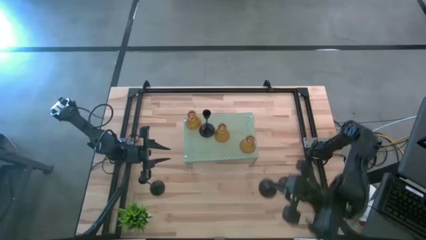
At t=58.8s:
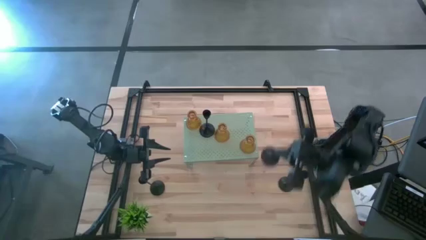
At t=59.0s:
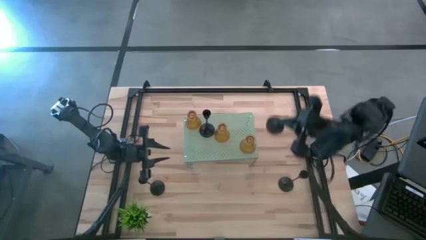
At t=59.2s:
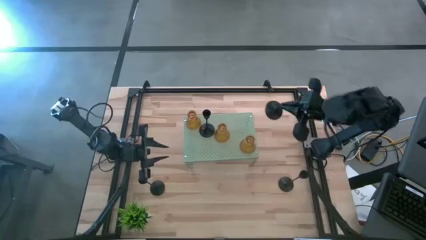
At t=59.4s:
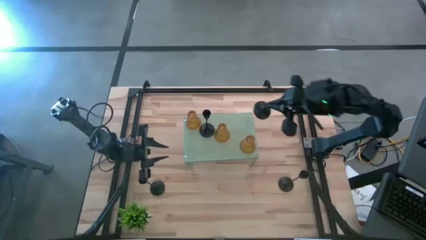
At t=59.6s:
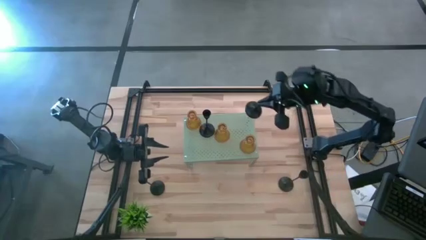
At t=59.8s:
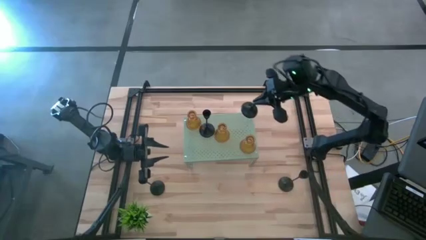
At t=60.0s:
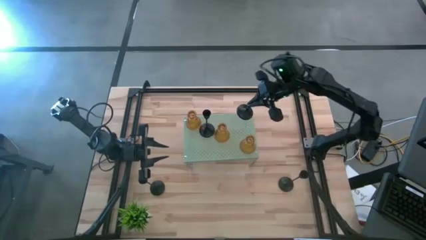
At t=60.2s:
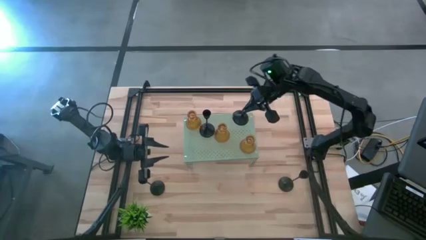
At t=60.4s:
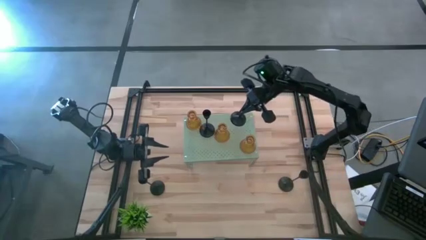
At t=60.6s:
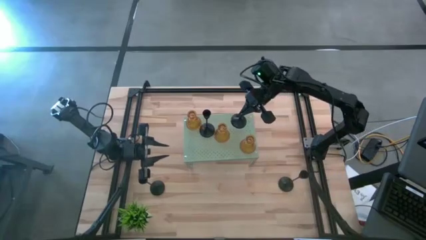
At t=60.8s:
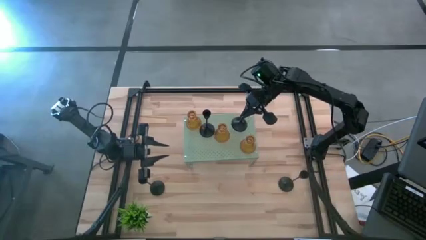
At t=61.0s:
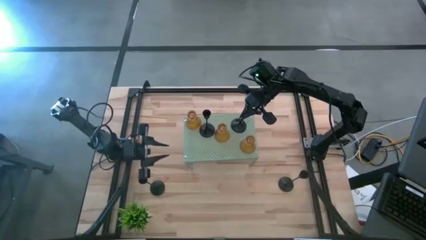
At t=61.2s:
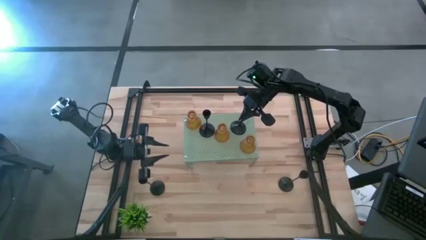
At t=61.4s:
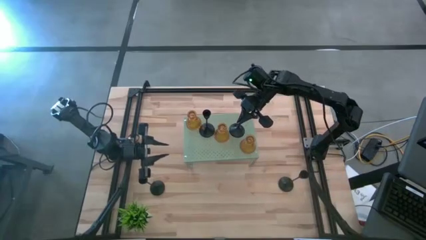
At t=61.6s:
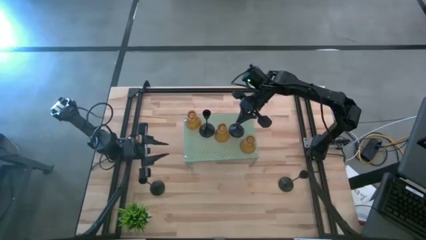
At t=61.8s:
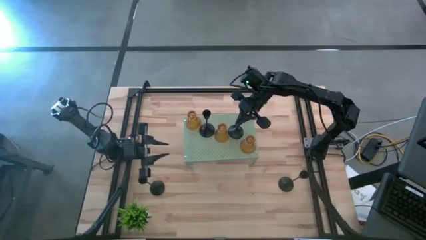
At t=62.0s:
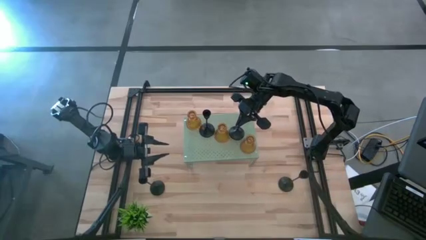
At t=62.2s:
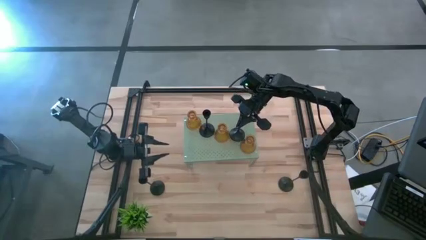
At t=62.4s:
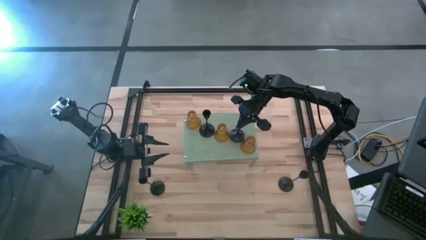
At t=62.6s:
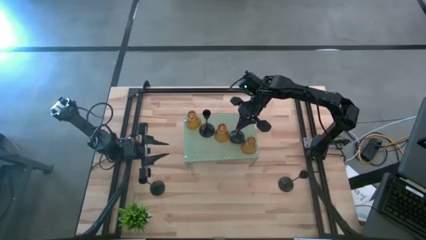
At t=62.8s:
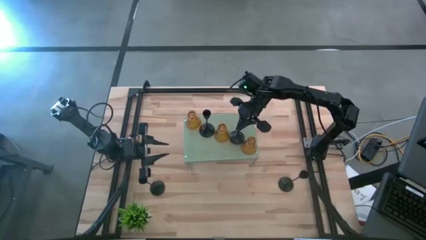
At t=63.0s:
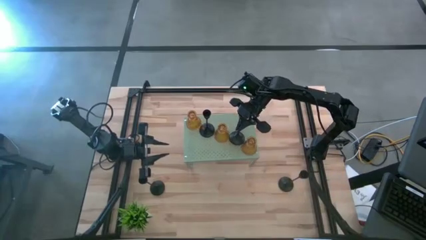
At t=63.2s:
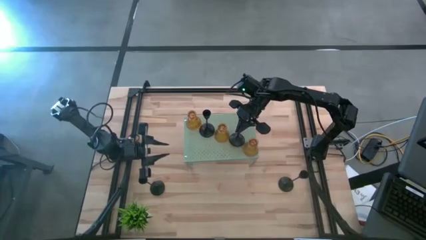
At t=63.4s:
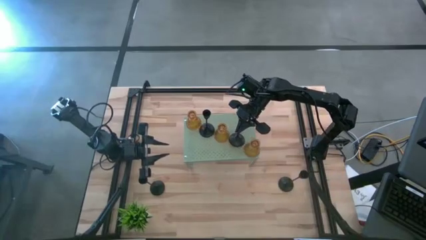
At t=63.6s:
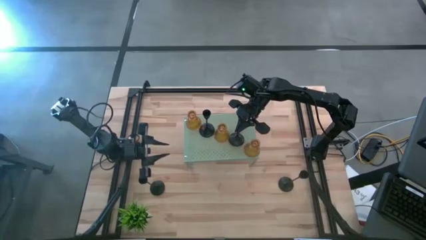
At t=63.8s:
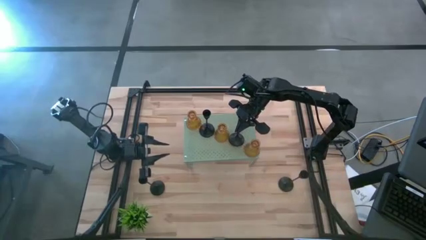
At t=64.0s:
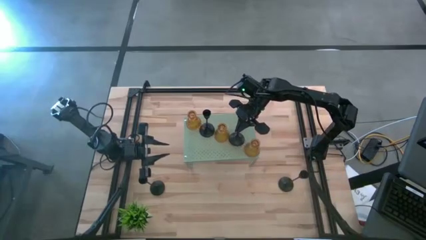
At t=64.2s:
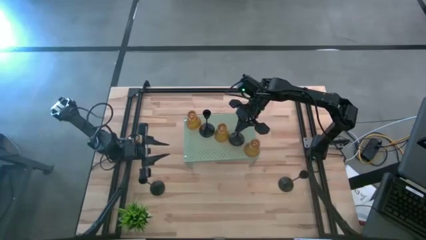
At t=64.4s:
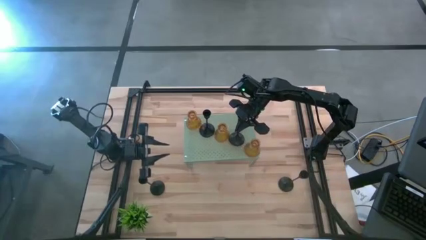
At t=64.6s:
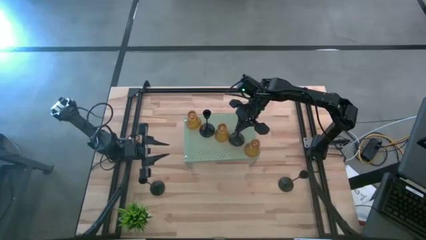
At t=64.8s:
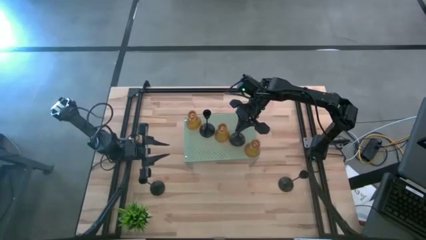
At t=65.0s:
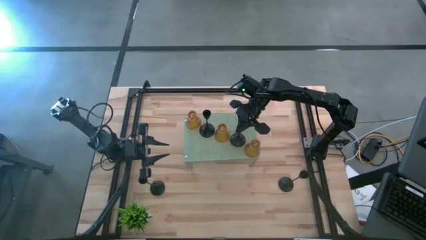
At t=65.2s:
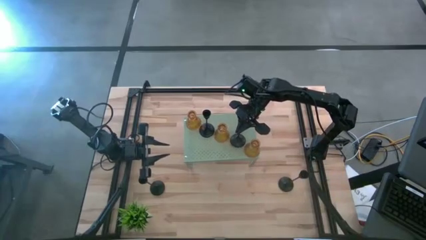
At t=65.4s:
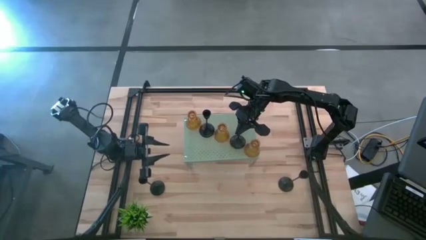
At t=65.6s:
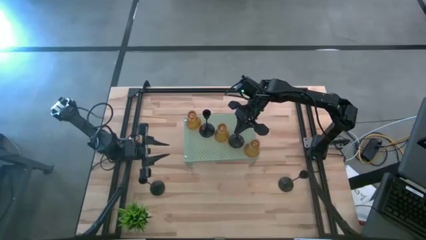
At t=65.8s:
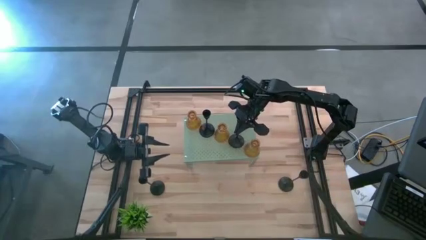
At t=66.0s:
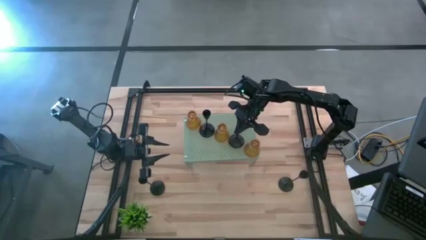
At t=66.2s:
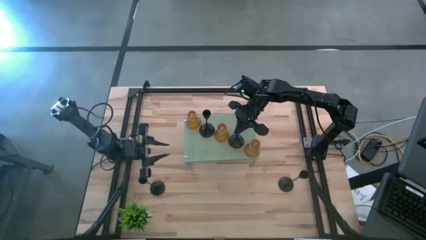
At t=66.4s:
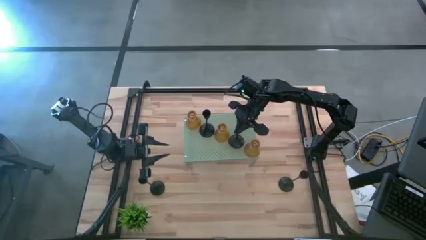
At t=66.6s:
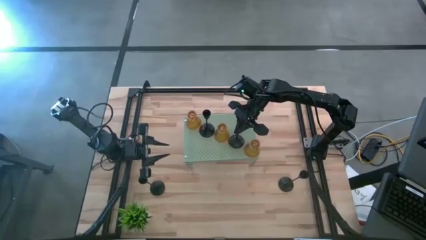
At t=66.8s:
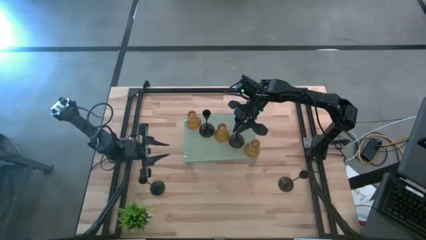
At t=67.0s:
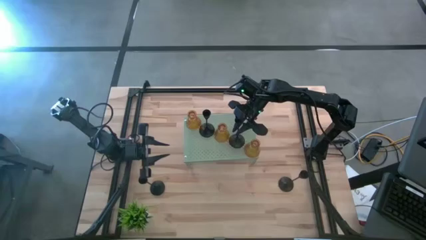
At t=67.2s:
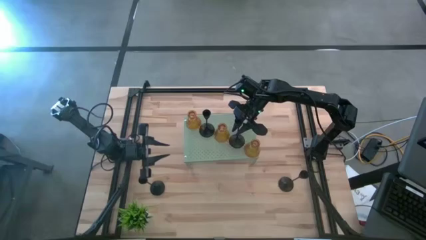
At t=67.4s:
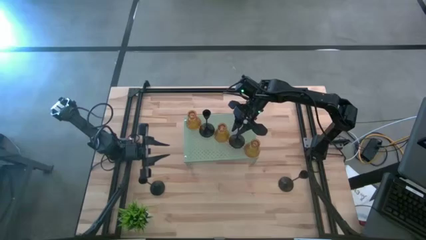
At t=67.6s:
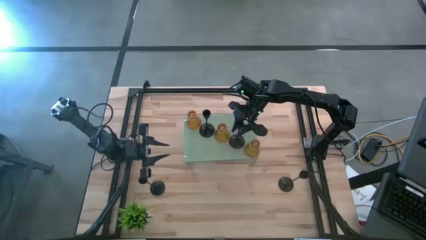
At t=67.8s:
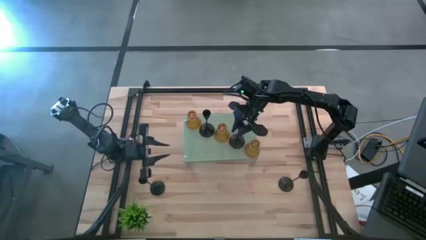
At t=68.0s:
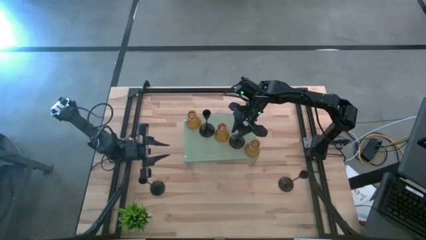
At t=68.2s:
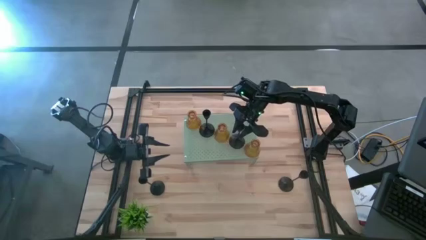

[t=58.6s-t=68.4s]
Task: Pick & Place candle stick holders
Put the black candle holder on the shelf

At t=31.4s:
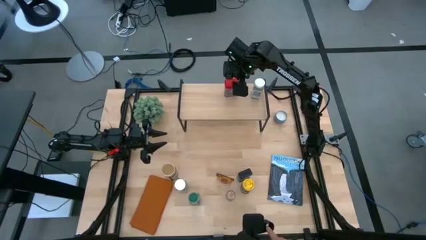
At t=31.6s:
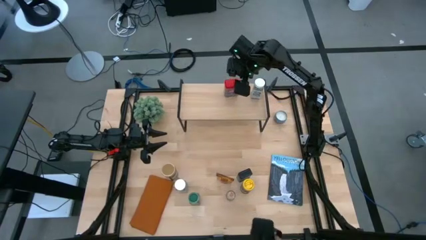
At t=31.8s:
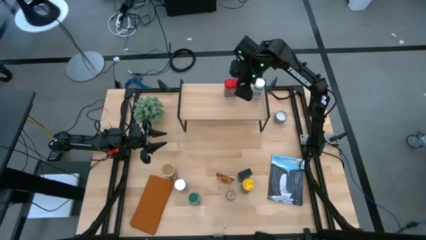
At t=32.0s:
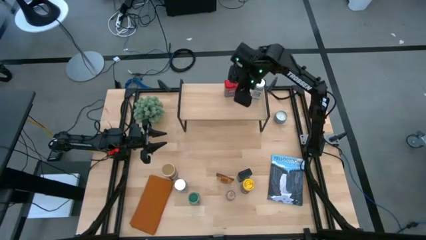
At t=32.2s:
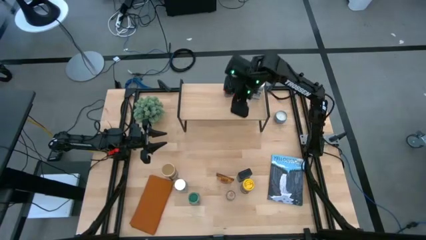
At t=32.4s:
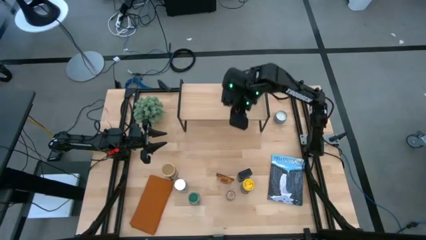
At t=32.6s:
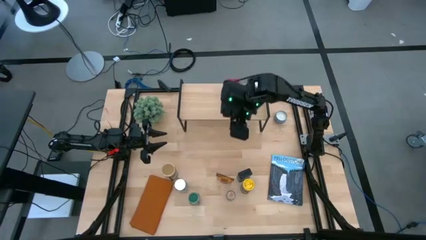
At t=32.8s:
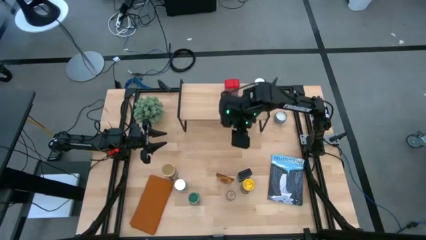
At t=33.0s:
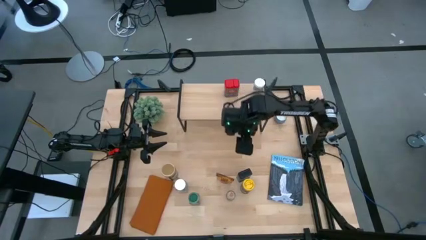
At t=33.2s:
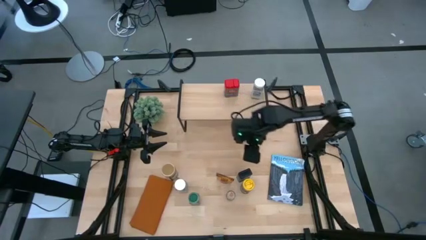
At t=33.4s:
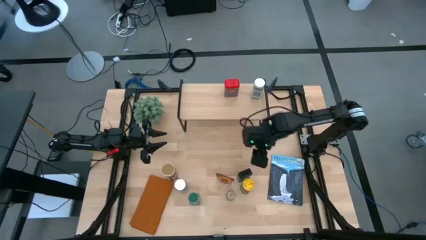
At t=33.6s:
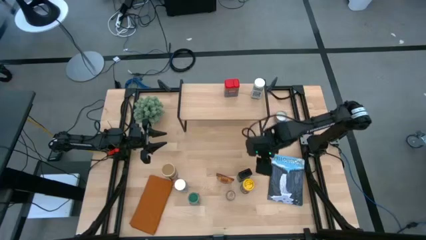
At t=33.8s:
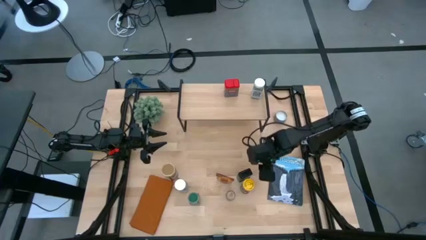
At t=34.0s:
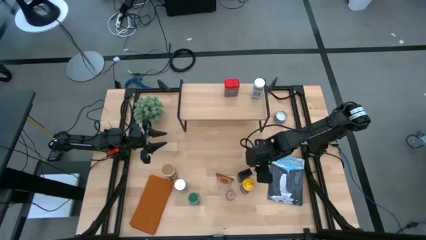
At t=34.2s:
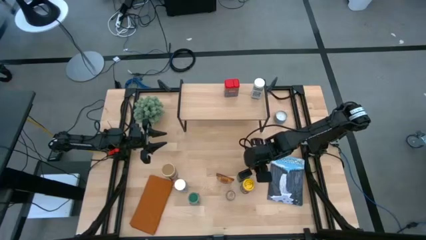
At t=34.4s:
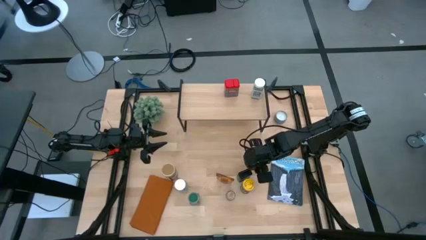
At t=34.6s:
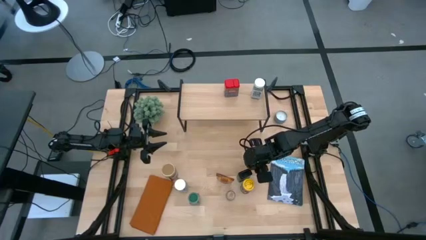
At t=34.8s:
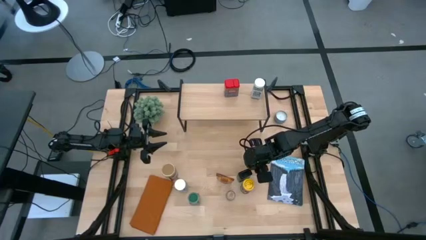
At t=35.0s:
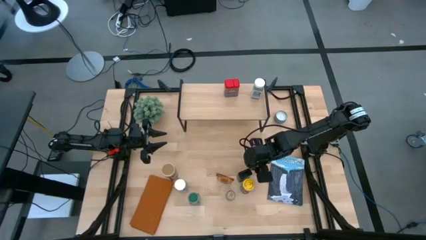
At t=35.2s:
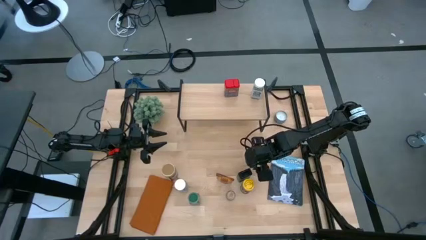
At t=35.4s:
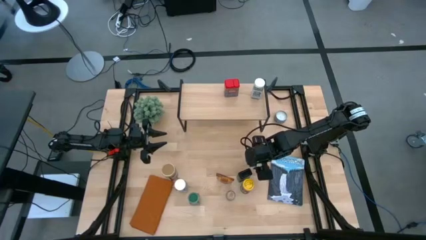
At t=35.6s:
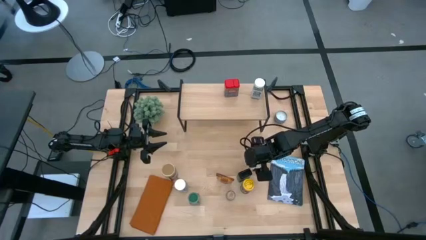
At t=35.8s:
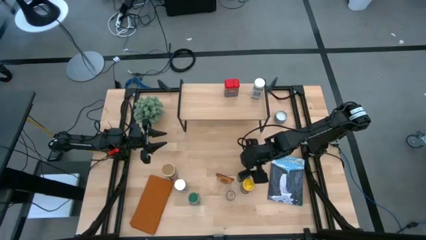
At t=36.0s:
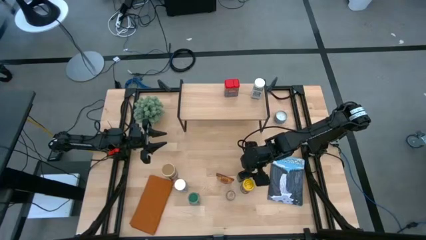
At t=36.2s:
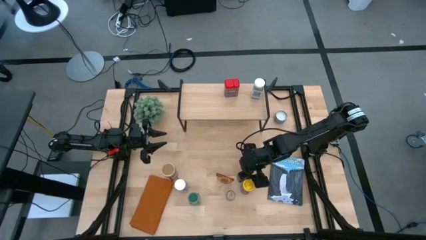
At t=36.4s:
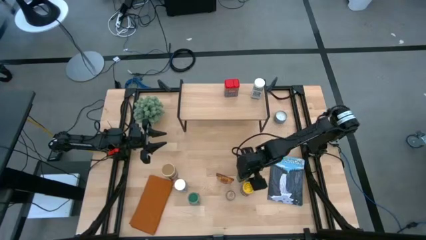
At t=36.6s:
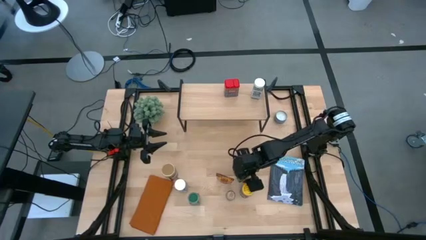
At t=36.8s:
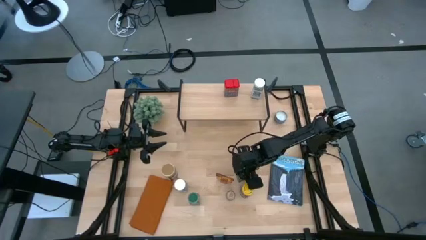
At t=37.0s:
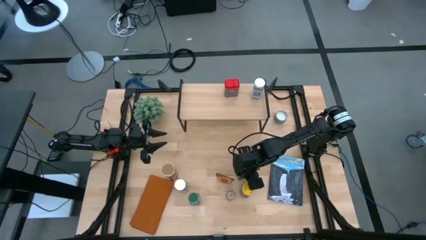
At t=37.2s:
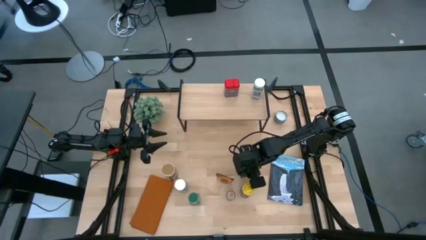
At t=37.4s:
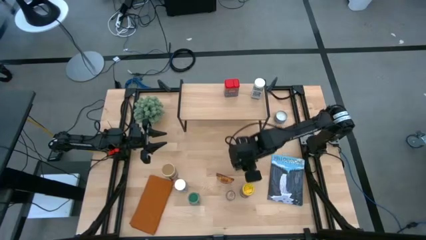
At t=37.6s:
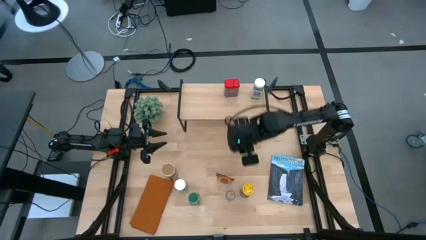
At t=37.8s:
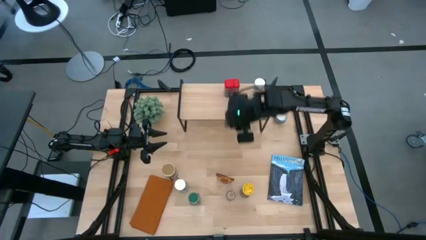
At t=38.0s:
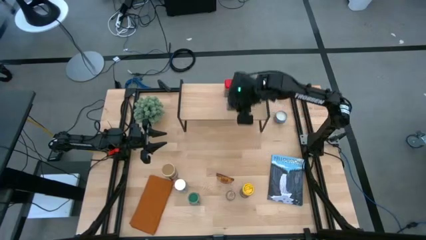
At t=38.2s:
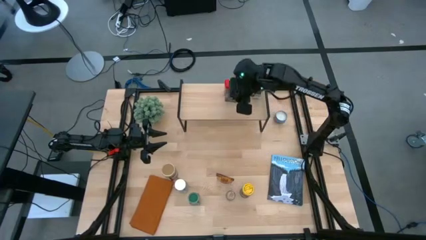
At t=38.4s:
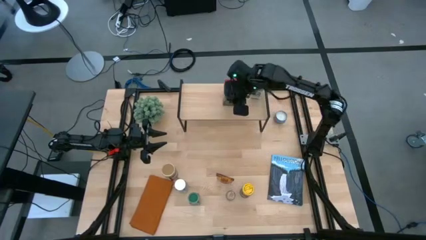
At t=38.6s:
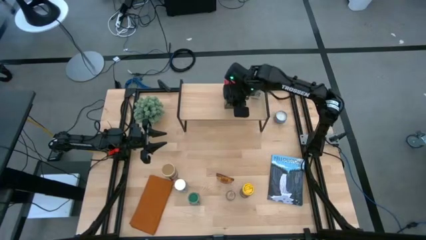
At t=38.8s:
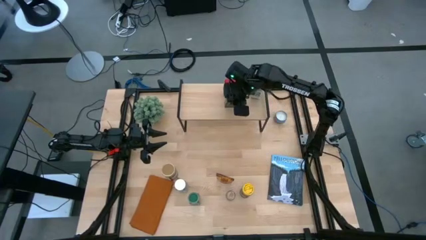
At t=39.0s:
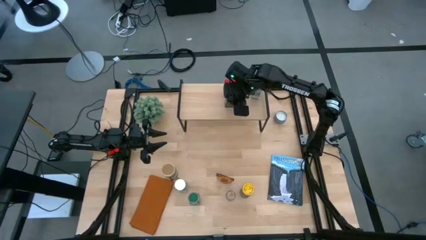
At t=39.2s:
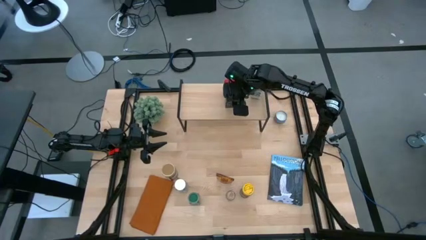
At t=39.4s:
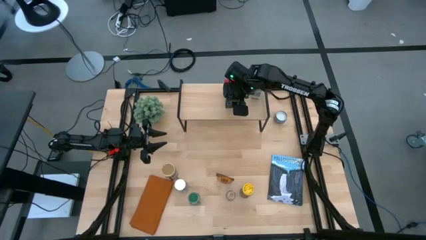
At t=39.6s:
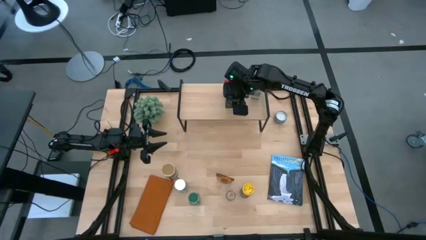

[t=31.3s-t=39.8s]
Task: Shelf spices
Put the black seasoning can on the shelf
